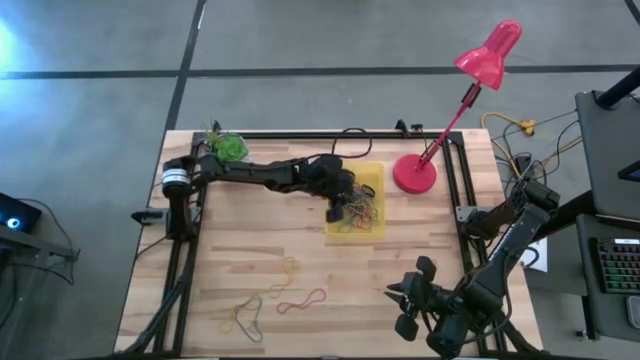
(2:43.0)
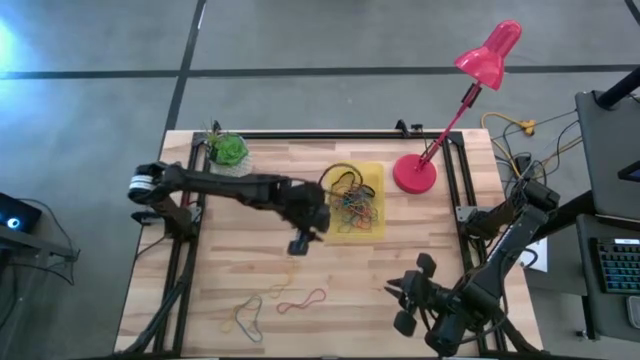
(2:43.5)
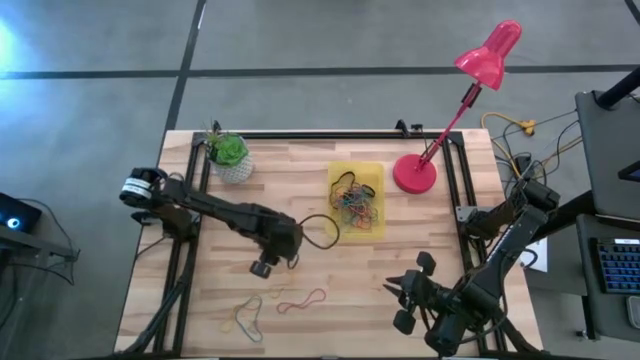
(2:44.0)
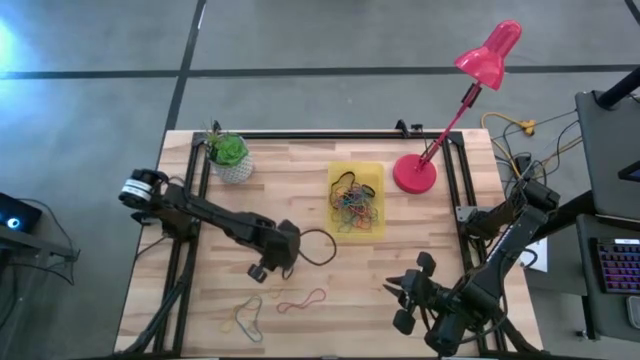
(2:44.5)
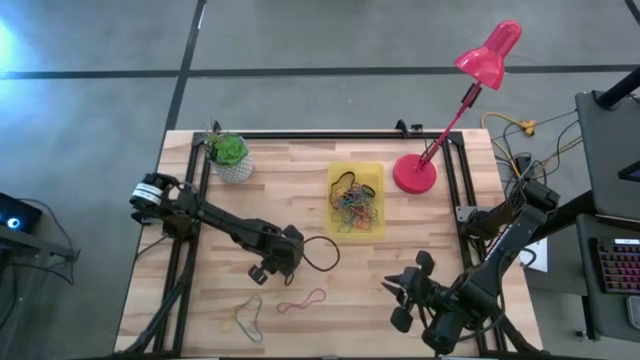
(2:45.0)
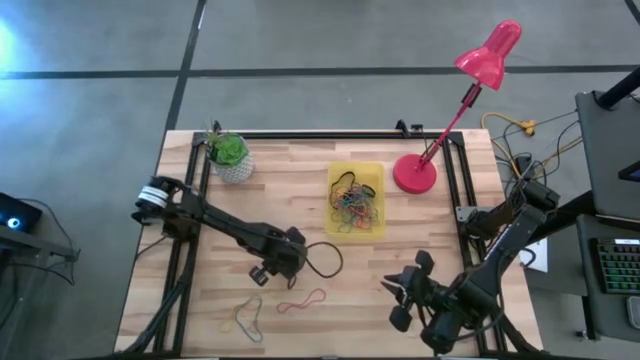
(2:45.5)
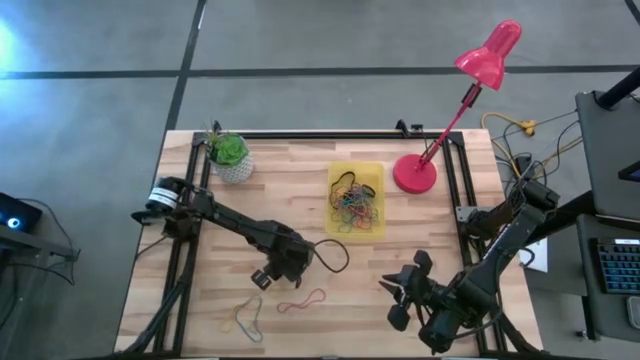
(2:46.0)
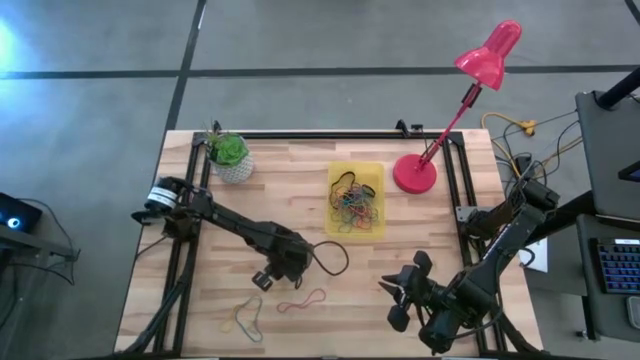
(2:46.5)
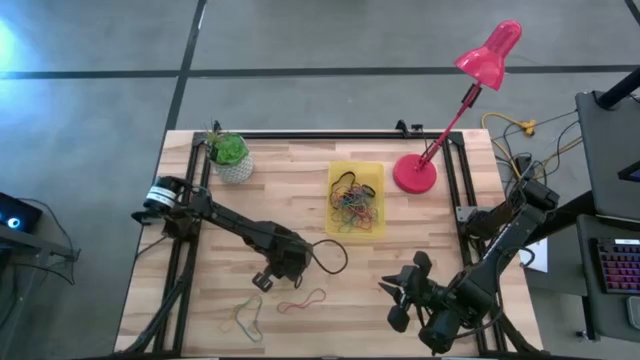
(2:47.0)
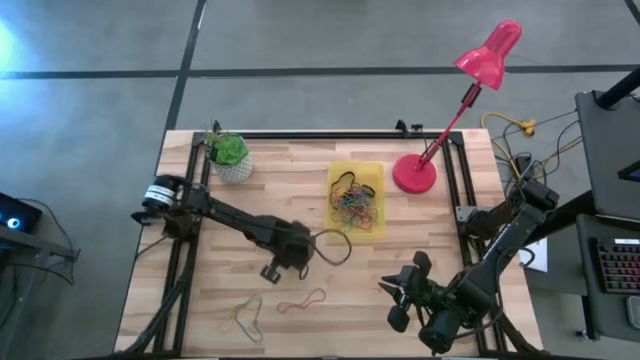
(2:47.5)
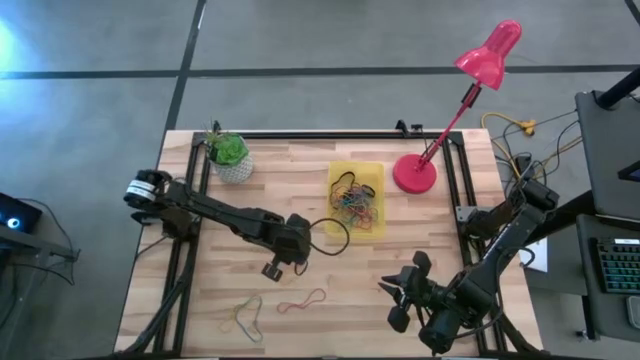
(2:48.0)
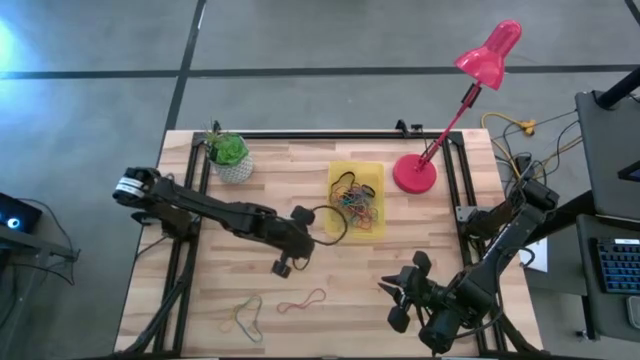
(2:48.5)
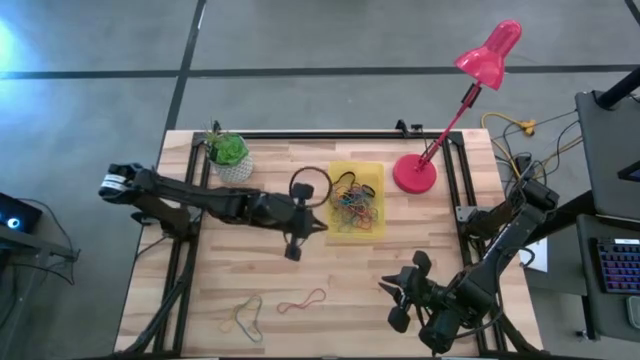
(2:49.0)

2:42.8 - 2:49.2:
Task: Pick and place rubber bands into bin
Put the top yellow rubber band into the bin

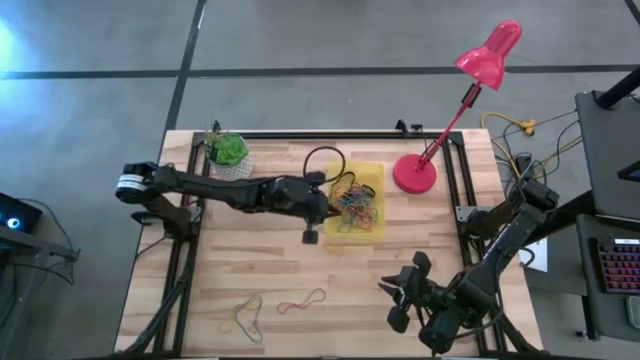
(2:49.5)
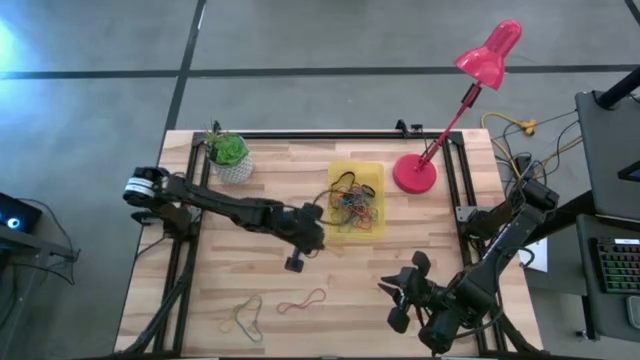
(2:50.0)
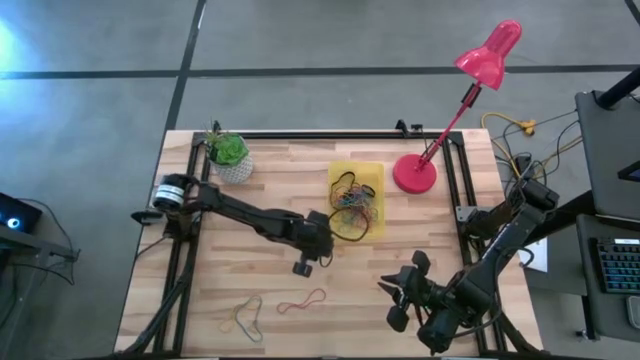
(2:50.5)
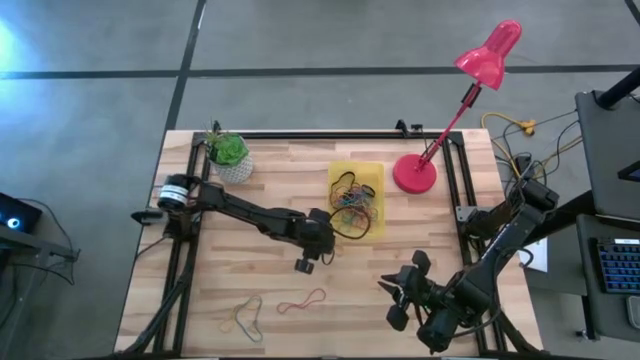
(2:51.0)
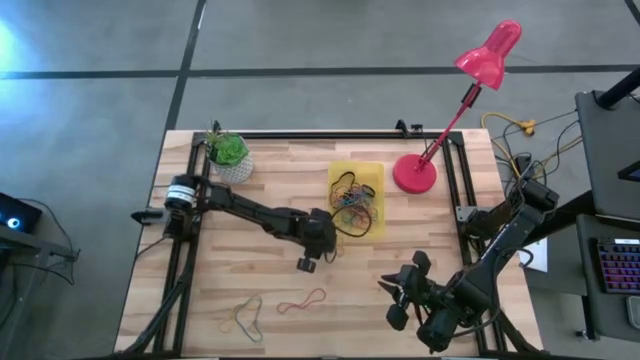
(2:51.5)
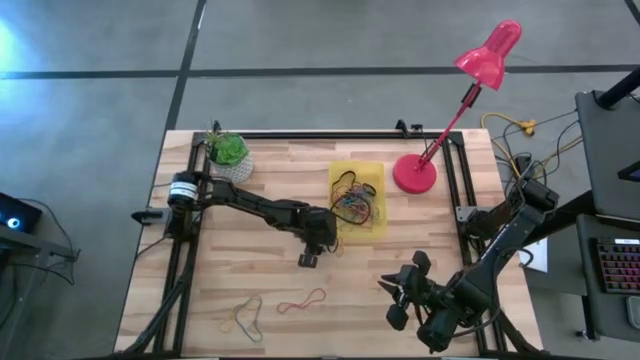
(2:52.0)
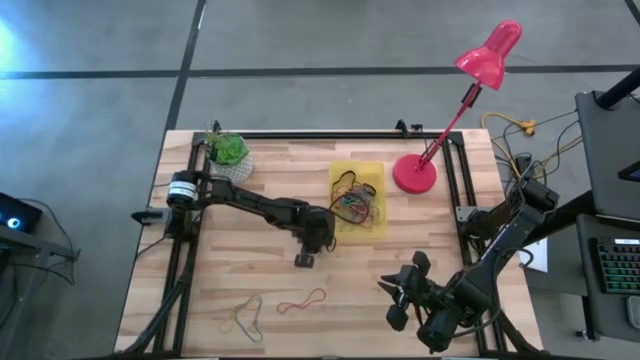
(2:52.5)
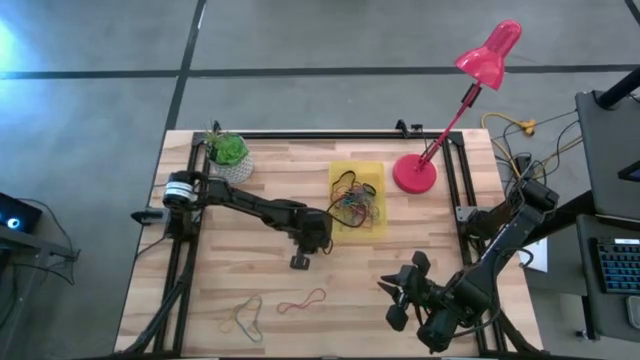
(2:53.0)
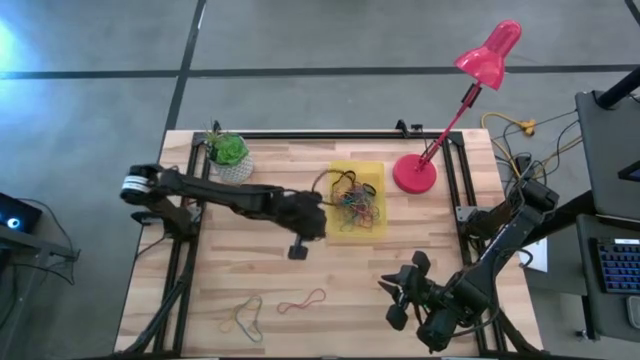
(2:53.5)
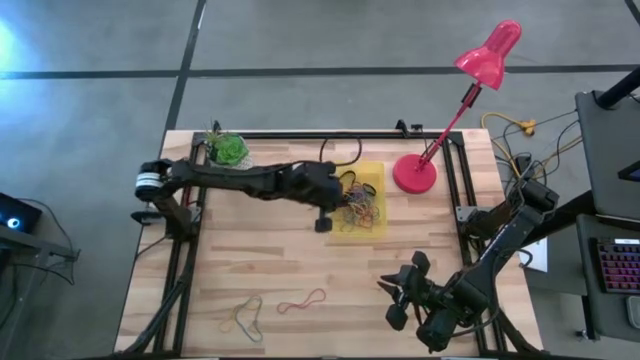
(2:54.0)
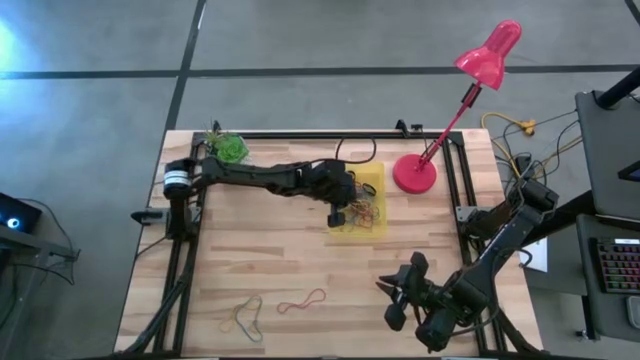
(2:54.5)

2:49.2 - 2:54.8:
Put the top yellow rubber band into the bin

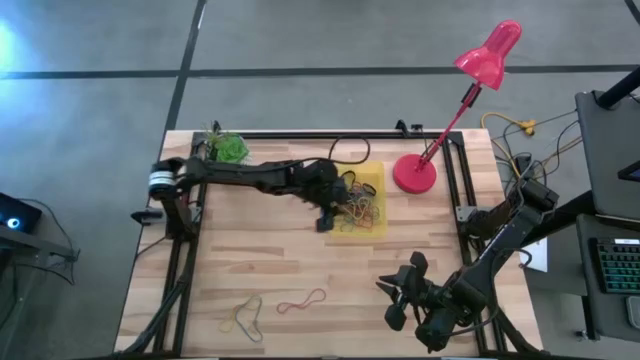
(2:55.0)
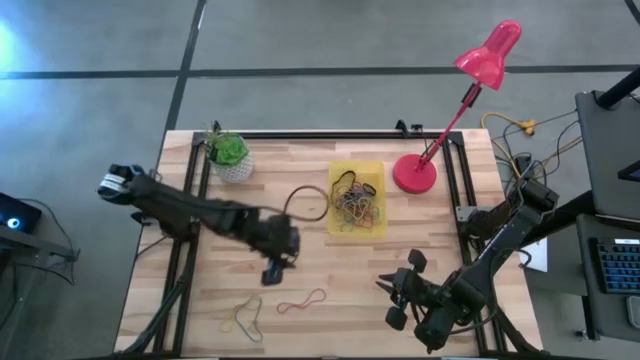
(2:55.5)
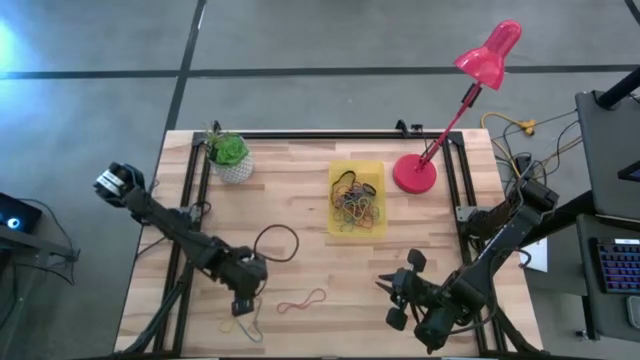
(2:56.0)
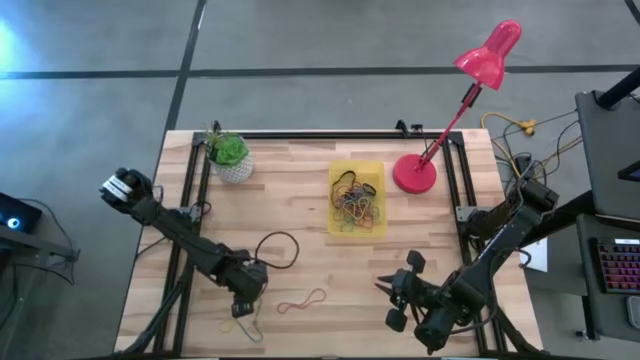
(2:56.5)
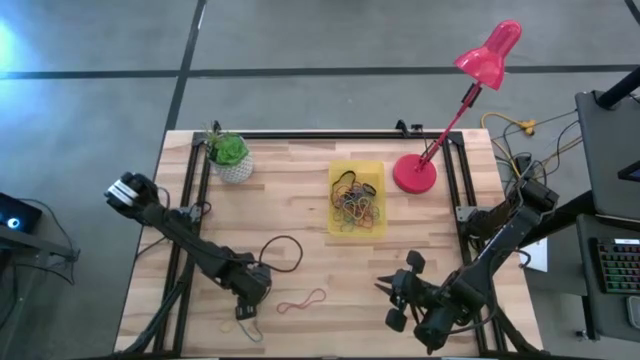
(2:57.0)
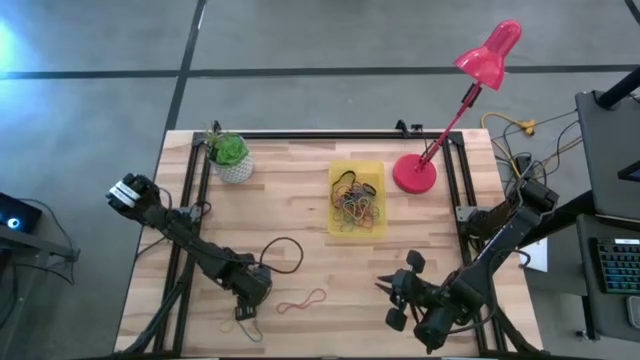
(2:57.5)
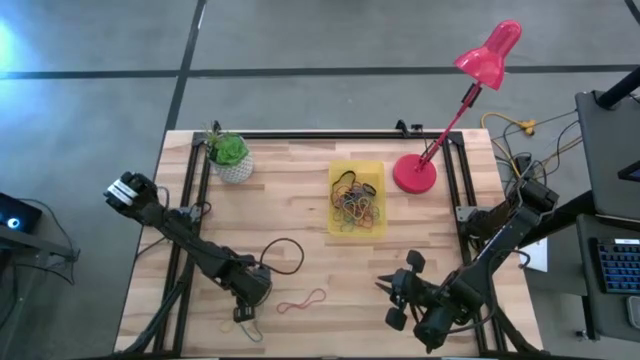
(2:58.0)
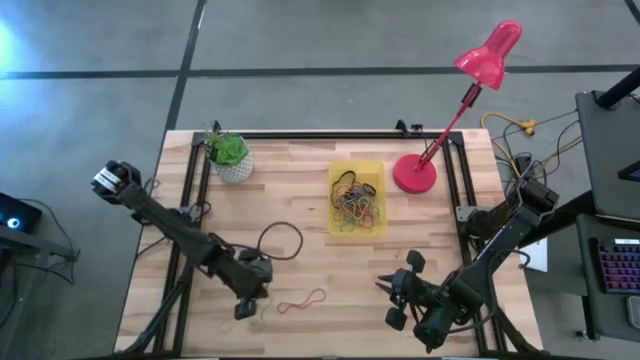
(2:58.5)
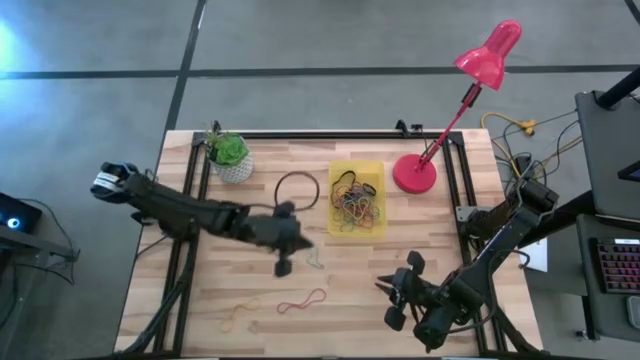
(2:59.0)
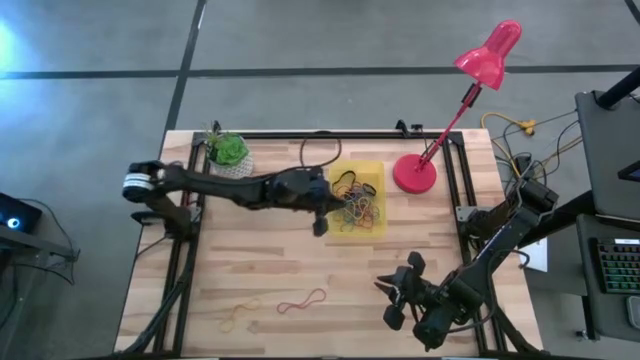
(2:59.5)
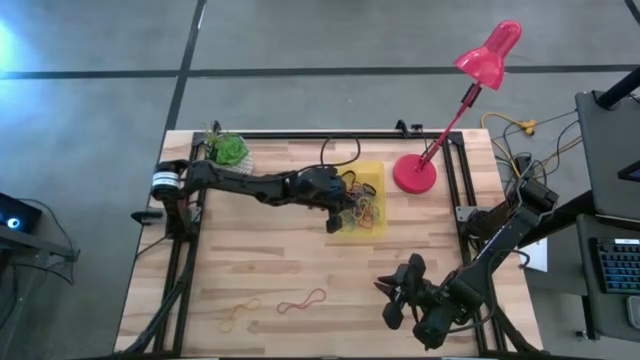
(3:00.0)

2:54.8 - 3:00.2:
Put the blue rubber band into the bin
